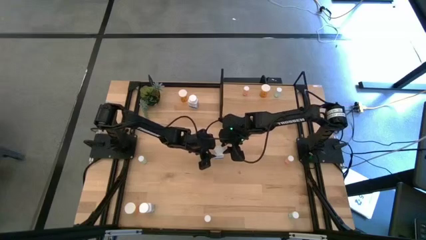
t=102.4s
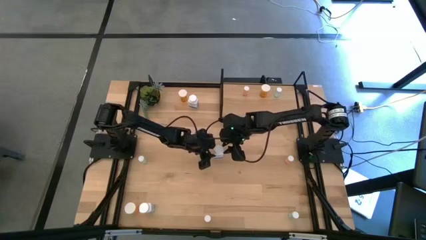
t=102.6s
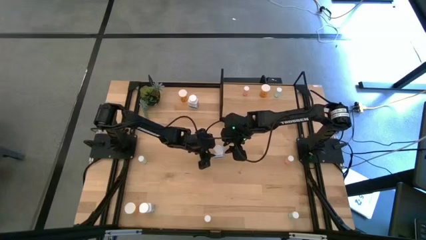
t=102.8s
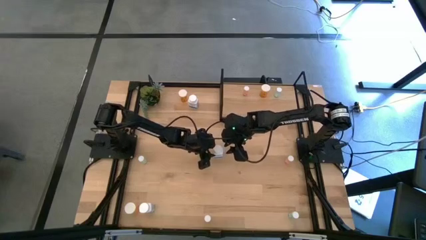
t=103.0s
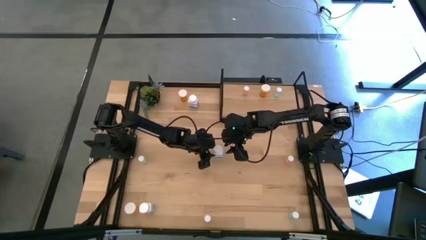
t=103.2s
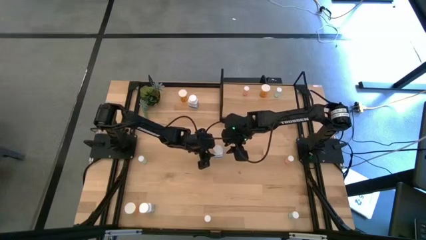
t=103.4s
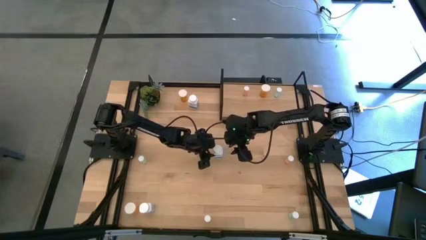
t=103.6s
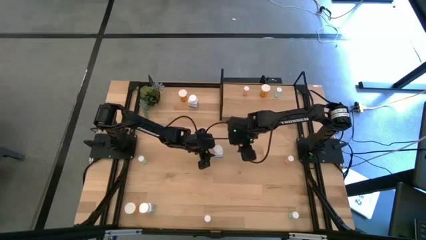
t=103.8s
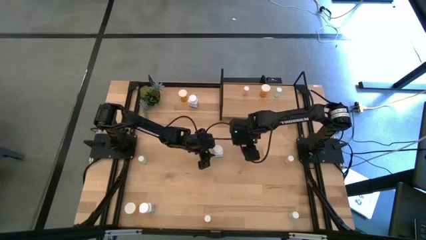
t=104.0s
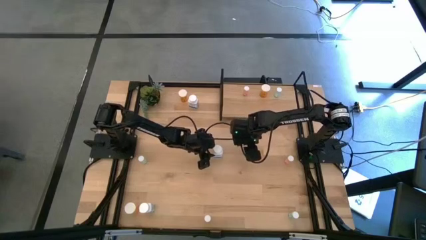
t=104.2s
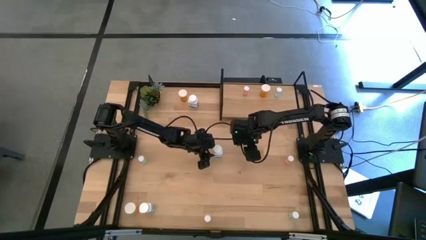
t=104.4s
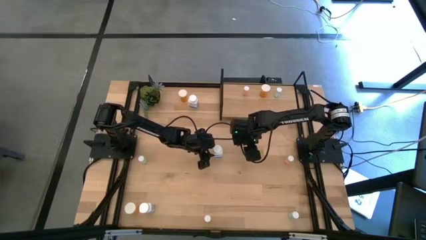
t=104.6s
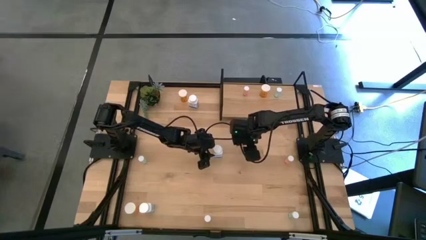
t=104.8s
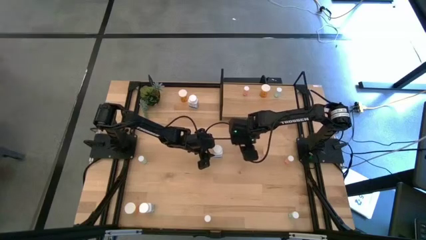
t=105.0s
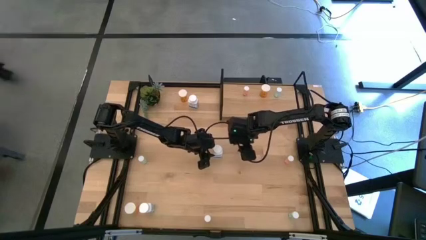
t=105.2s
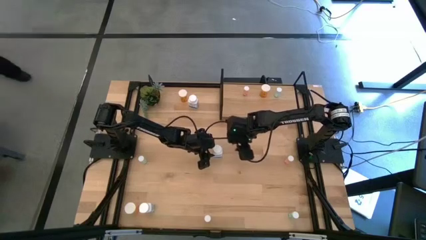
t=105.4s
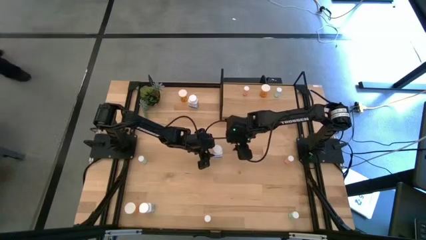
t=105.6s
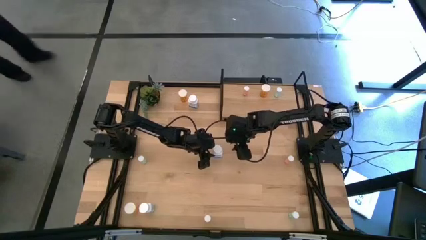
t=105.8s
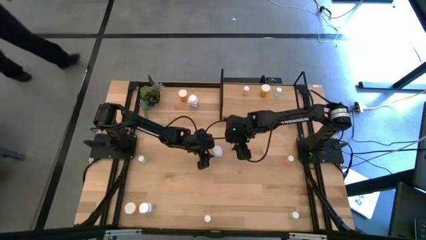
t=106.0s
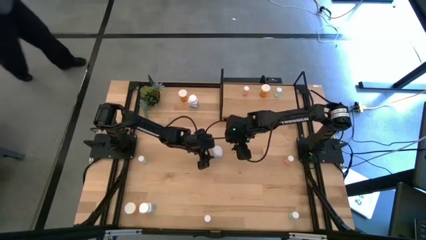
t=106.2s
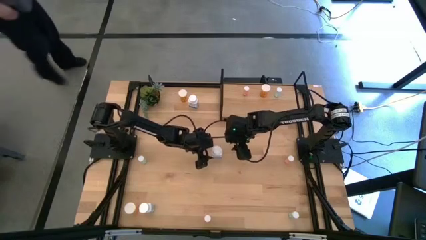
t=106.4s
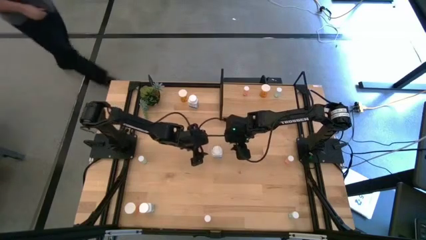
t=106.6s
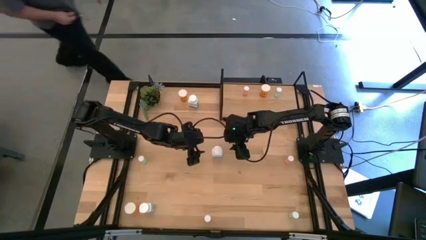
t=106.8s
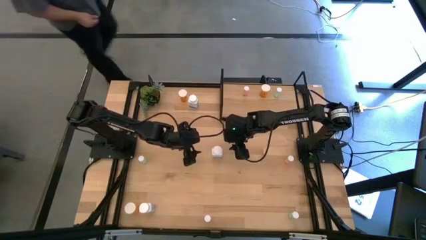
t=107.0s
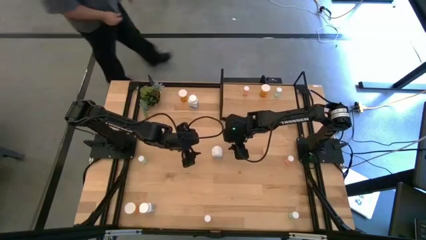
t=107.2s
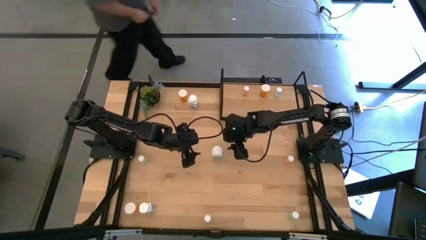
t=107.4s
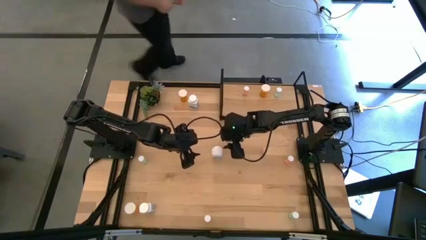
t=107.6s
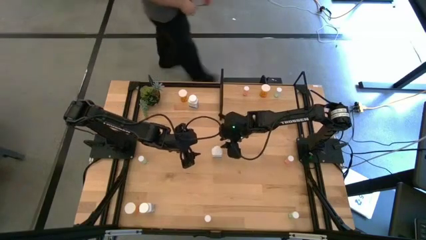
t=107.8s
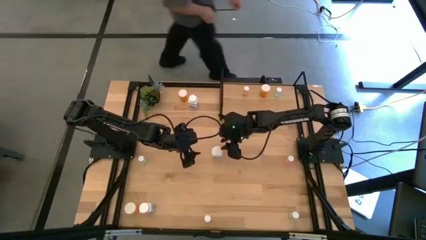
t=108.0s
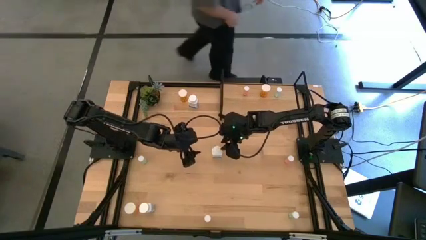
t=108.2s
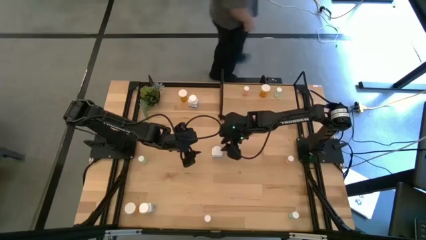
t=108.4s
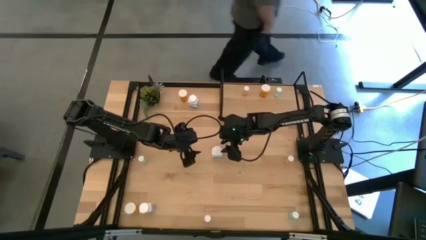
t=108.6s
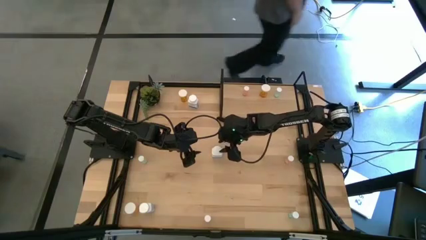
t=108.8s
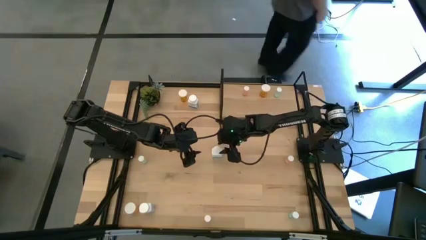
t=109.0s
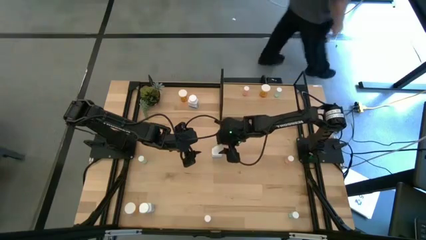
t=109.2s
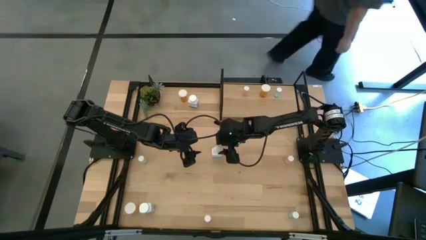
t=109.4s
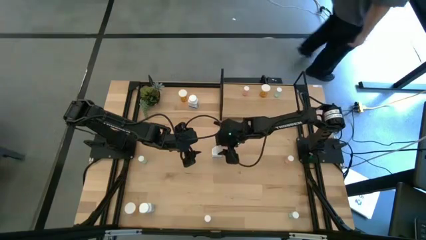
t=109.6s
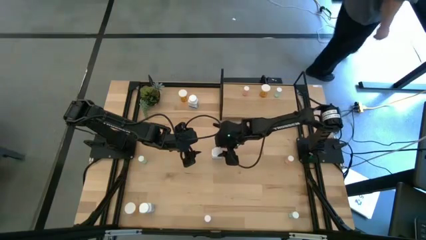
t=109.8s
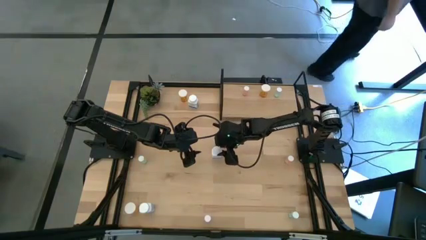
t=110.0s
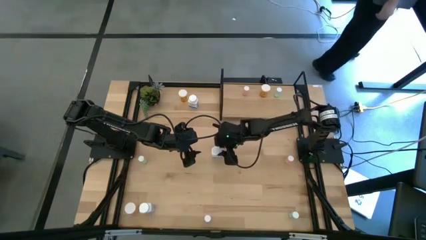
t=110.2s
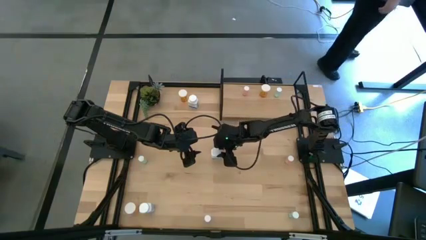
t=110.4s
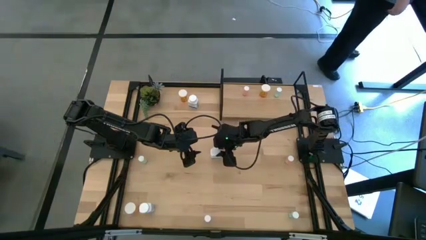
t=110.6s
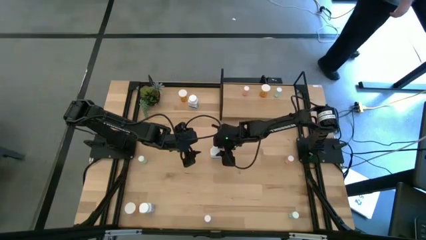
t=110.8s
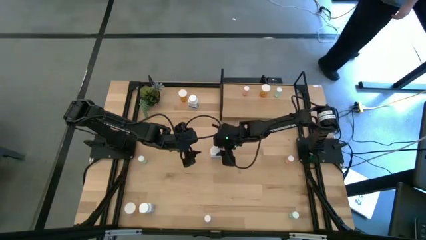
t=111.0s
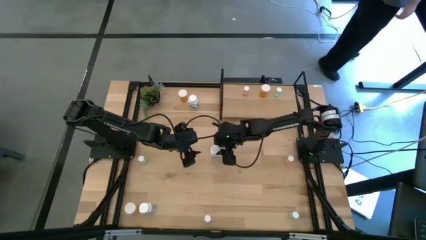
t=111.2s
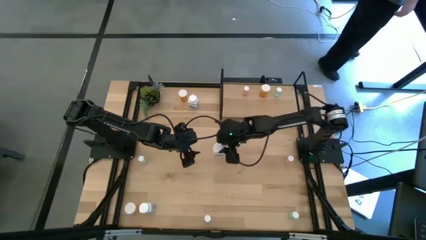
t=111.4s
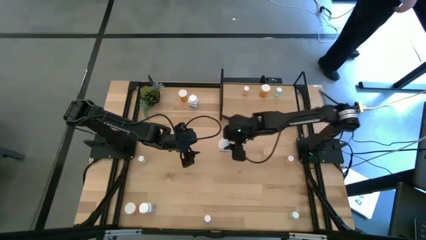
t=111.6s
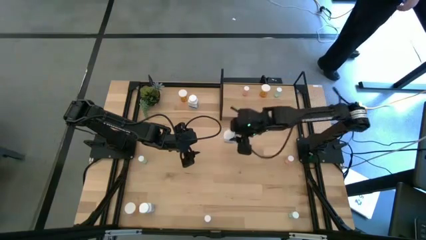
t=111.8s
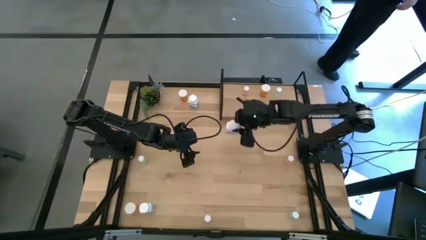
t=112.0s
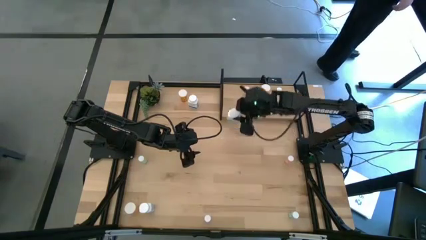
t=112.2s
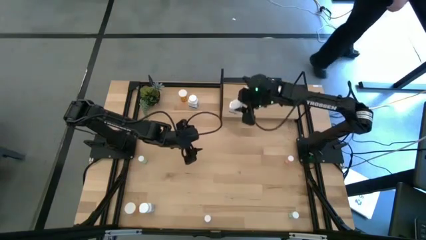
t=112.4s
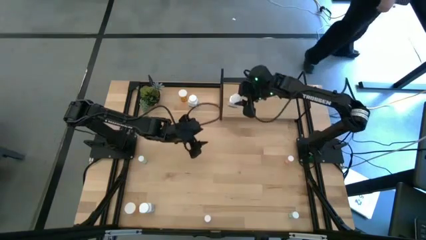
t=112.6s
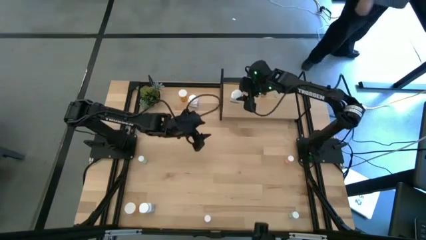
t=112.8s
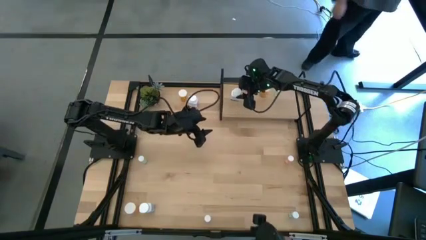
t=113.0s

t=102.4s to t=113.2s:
Task: Pick and place medicine bottles onto shelf by color
Put the middle white pill bottle on the shelf

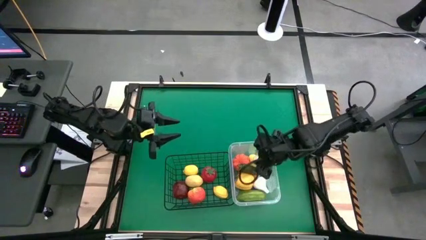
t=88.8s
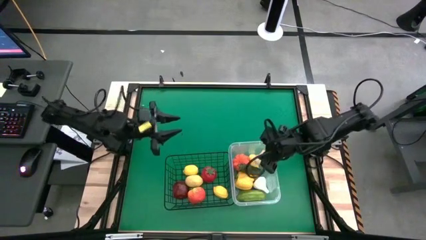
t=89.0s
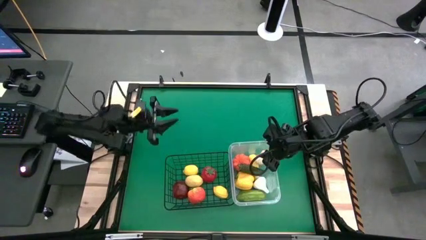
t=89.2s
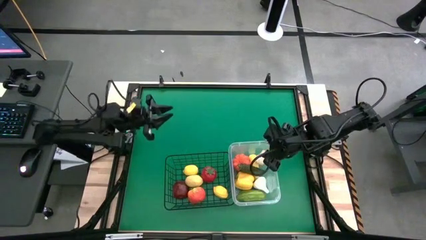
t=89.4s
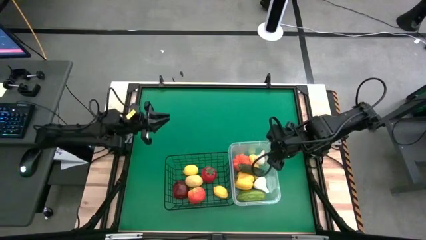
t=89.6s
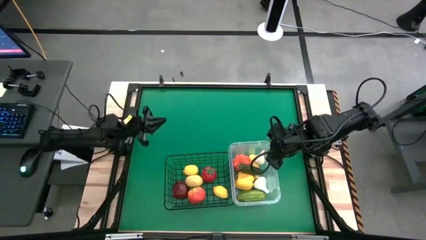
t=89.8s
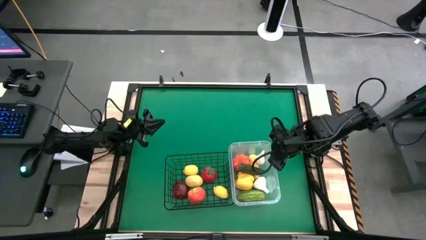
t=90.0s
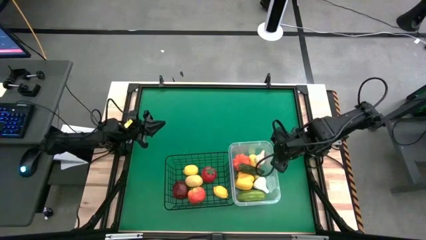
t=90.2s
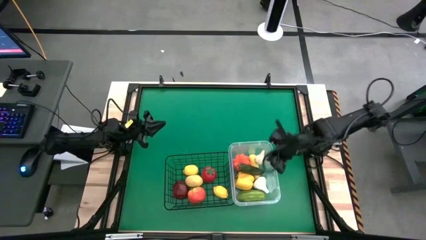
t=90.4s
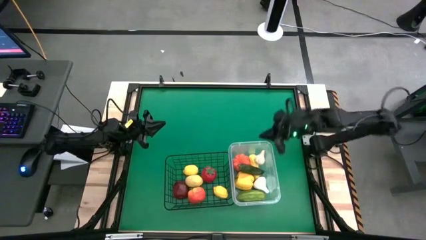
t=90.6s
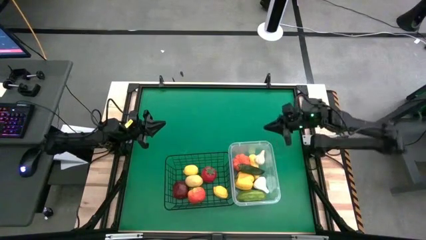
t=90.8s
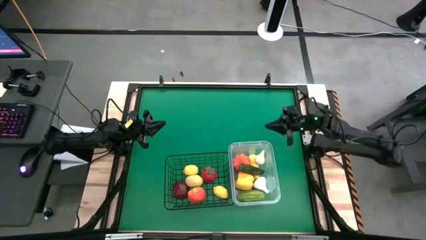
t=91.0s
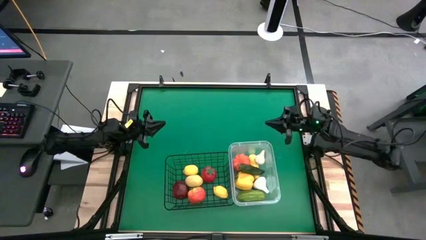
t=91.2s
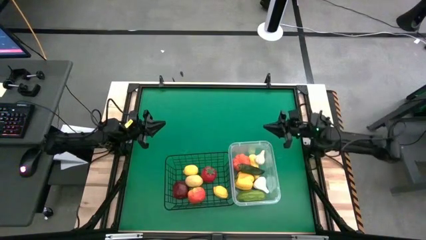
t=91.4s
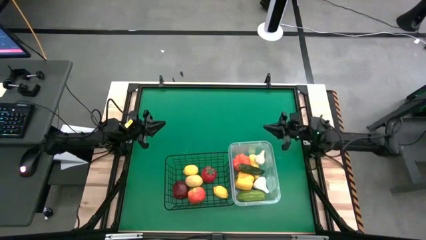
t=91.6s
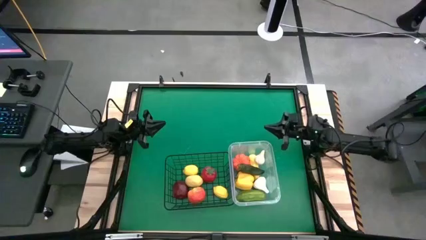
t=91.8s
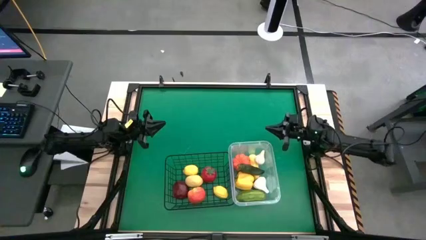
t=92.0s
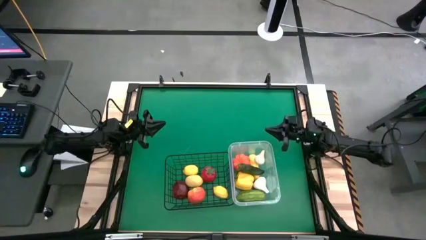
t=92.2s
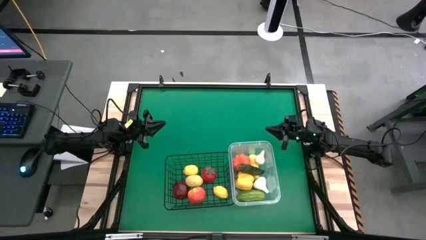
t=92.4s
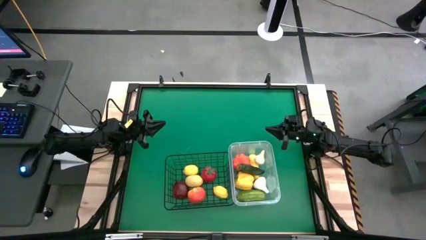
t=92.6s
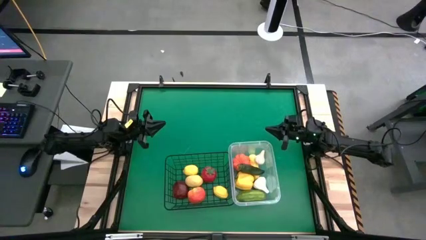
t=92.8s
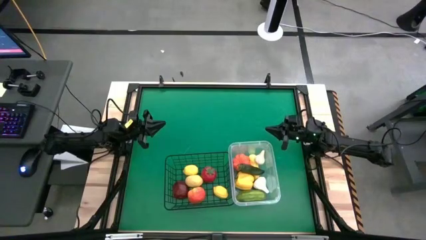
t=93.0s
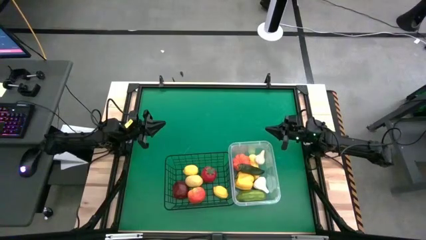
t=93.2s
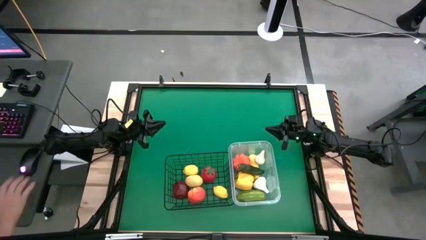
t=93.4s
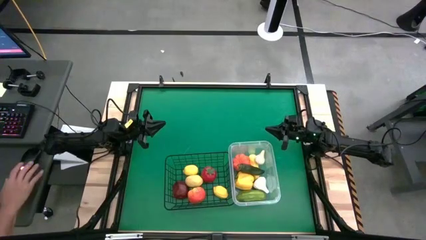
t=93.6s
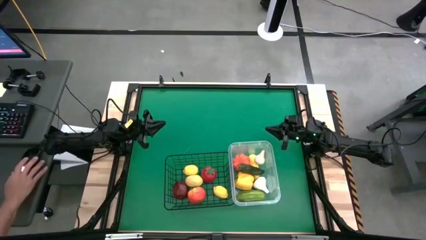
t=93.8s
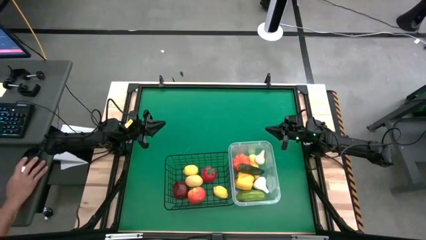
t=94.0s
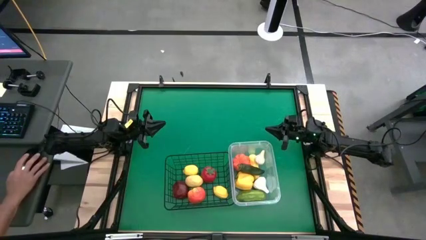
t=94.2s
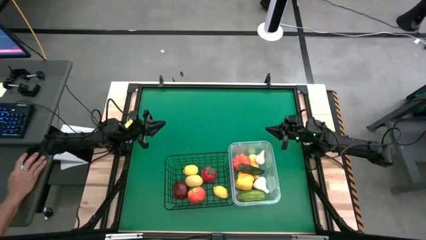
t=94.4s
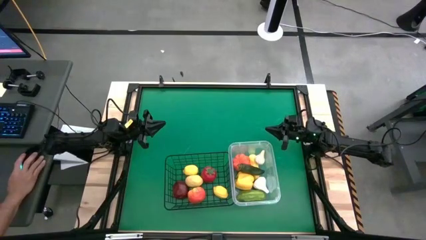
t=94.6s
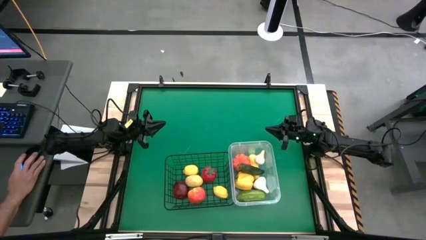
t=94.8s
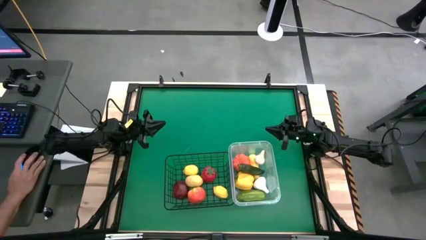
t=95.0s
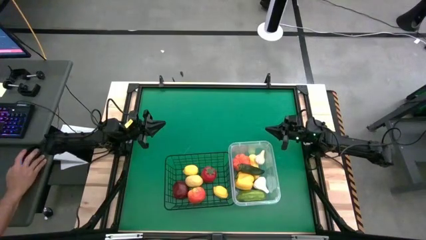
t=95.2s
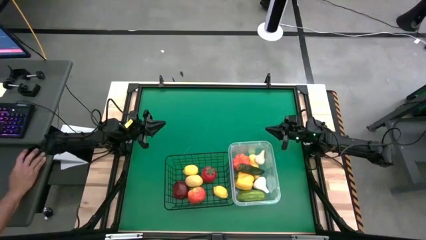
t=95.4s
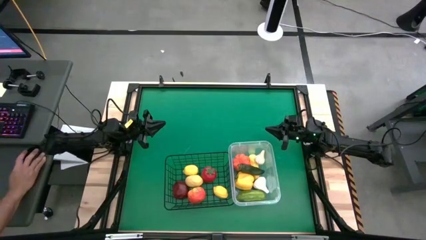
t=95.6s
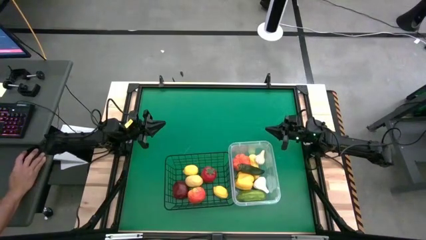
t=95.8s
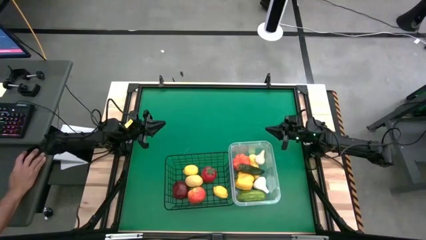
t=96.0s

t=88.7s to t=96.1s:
Task: Sort produce into baskets
Return to Home Position
